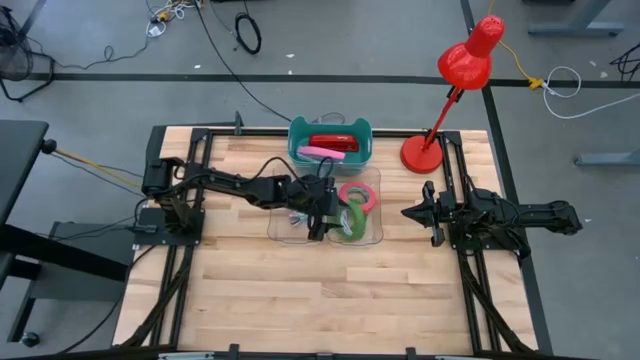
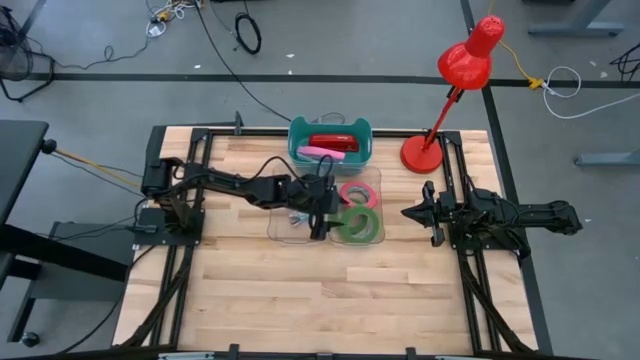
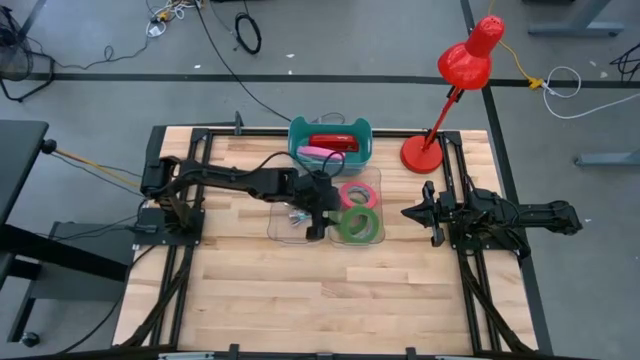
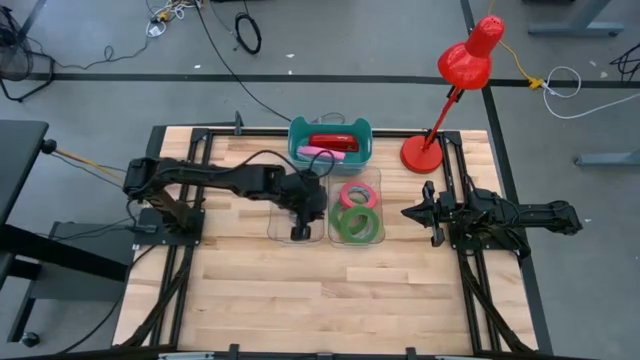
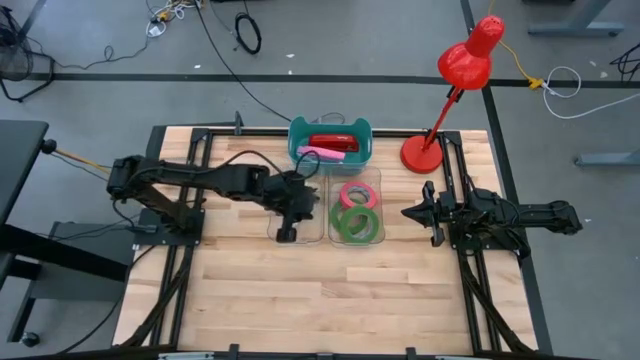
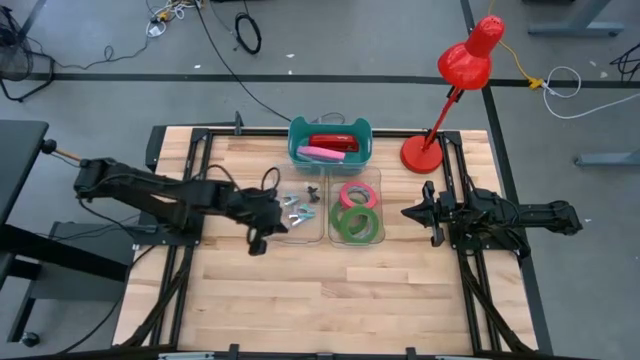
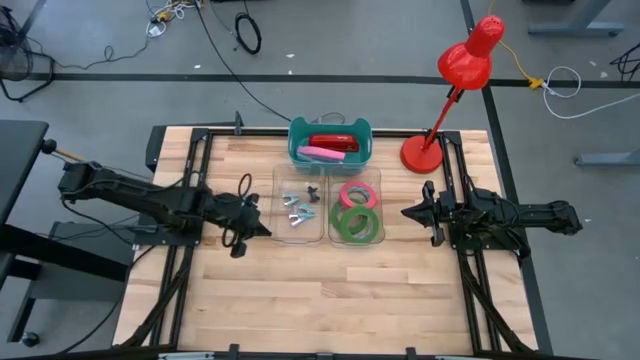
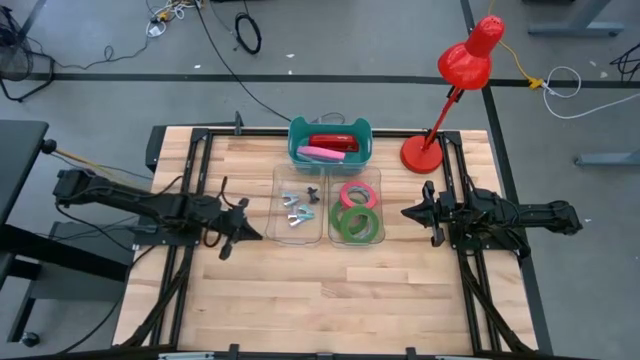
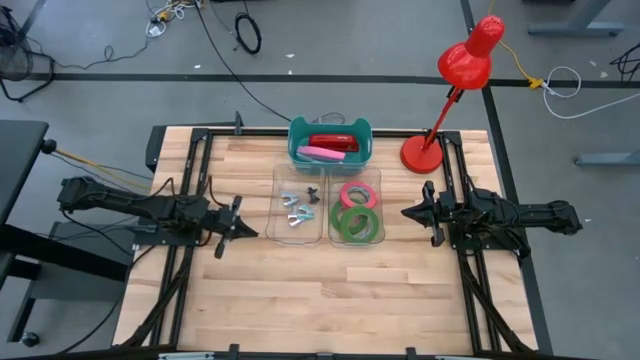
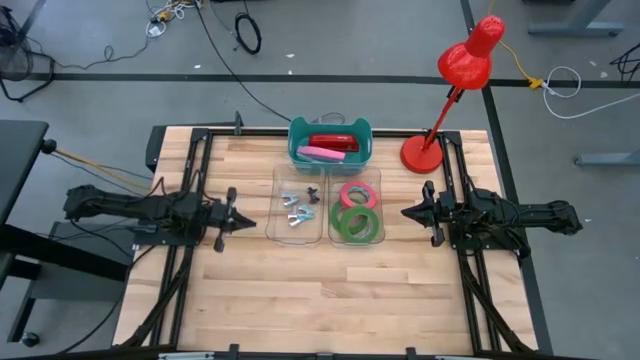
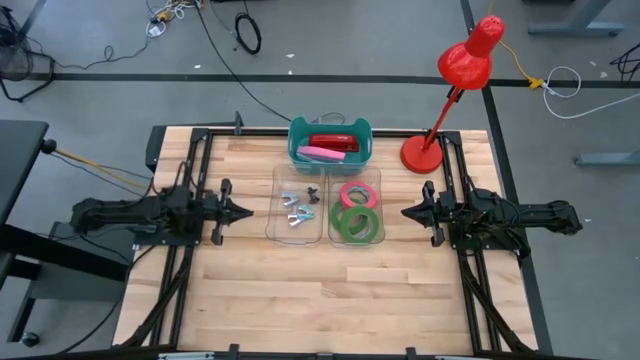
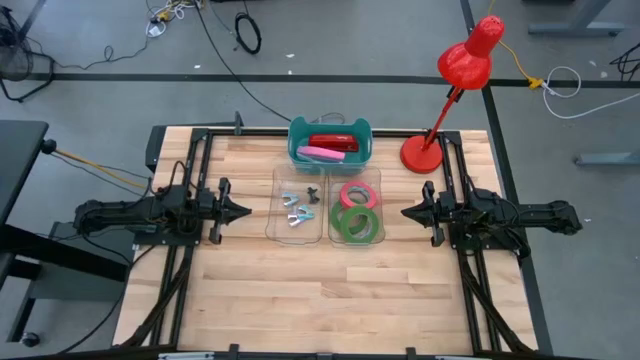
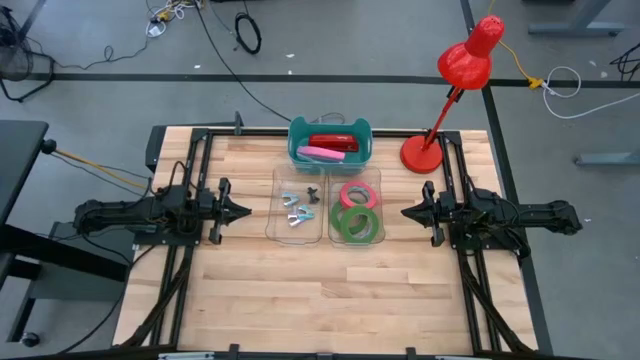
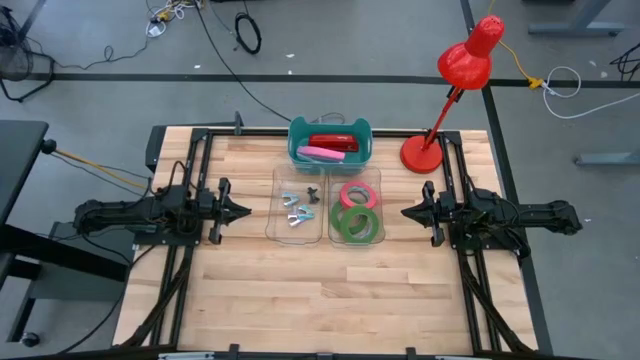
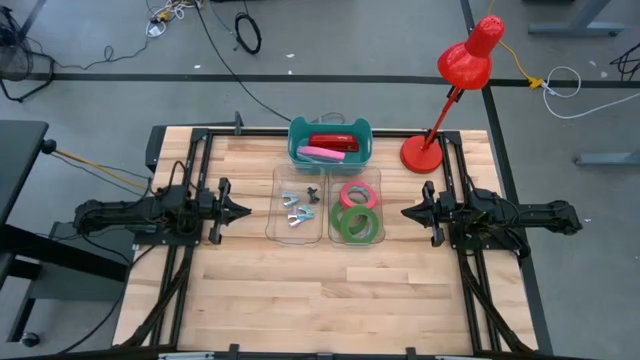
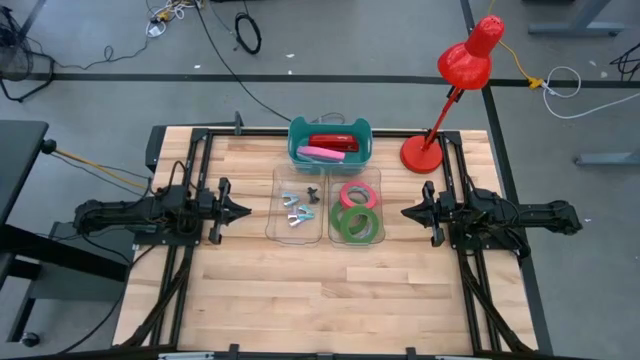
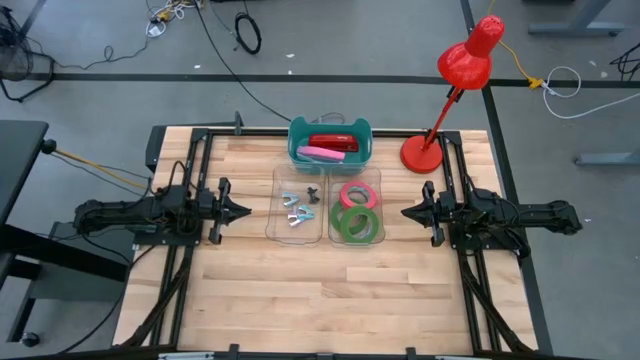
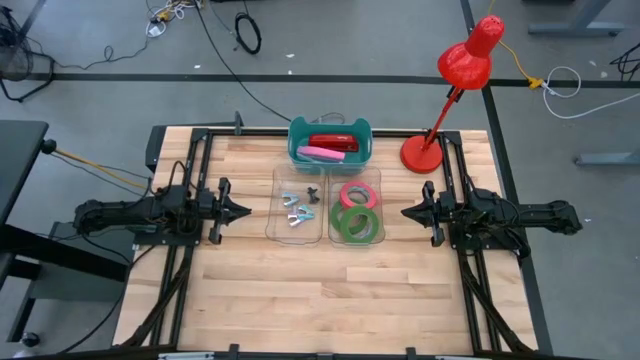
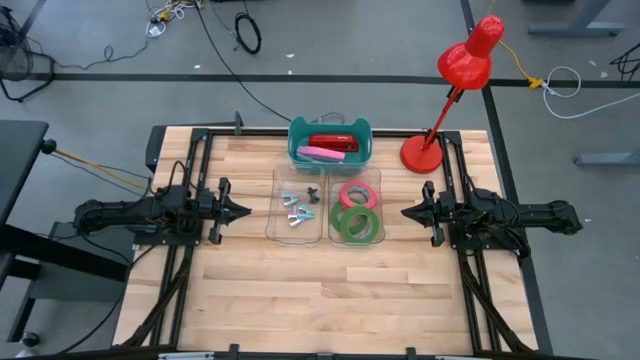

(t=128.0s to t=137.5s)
Task: Pick and place Stapler, Stapler remover, tape
Return to Home Position

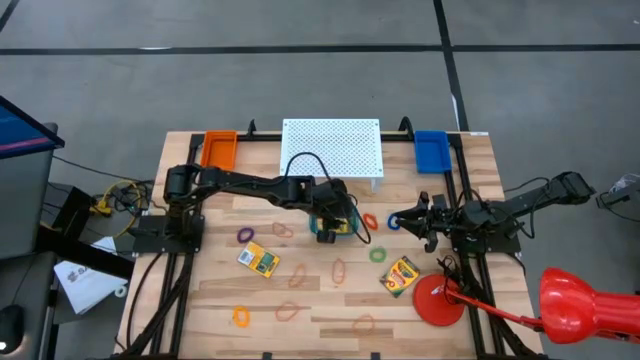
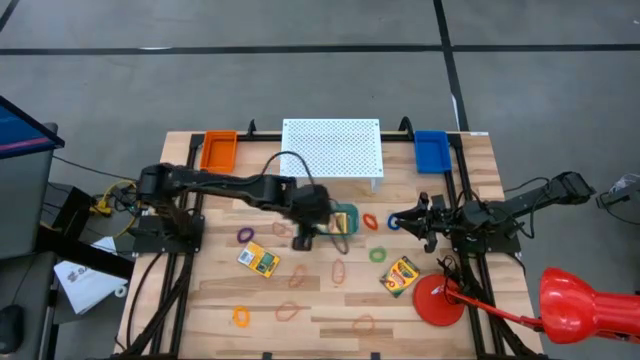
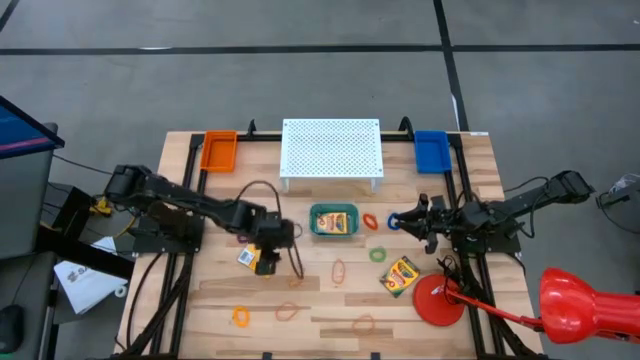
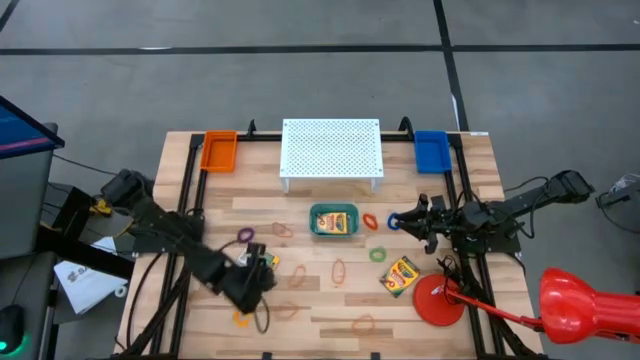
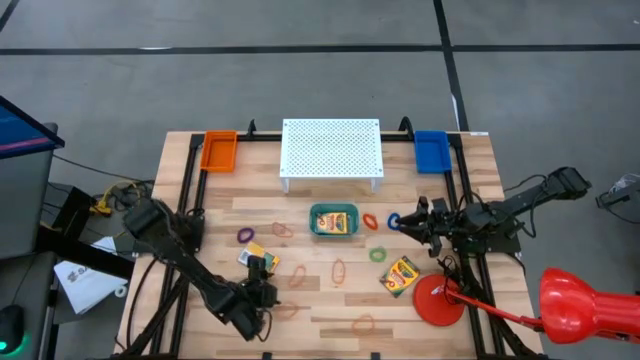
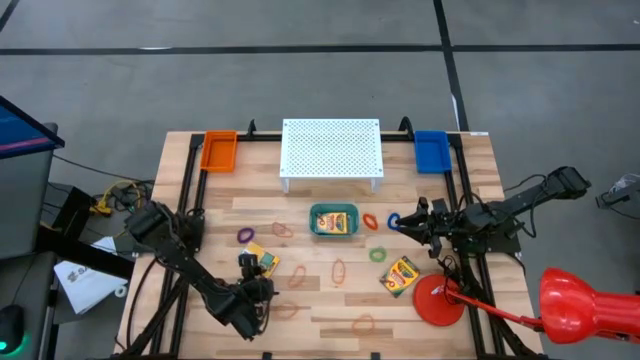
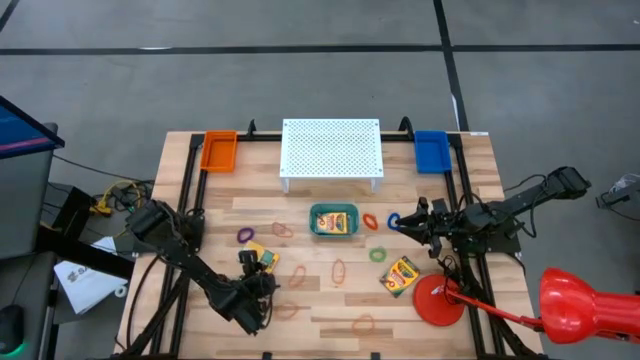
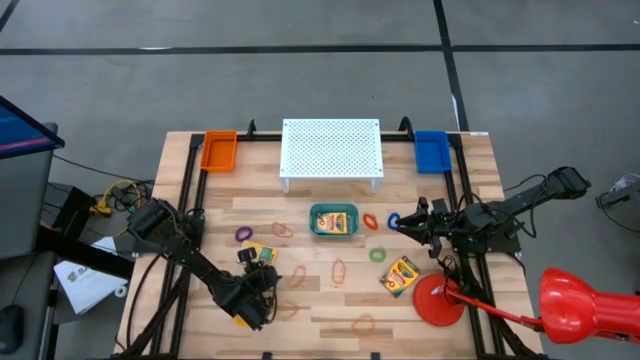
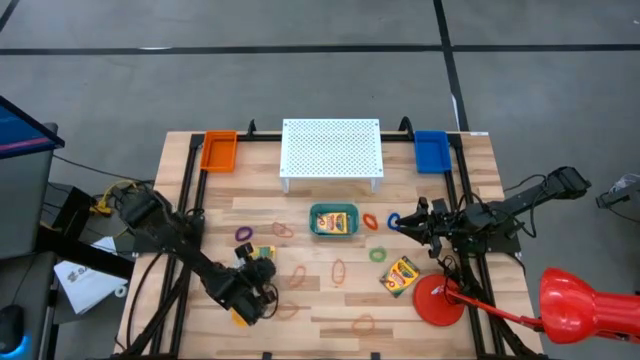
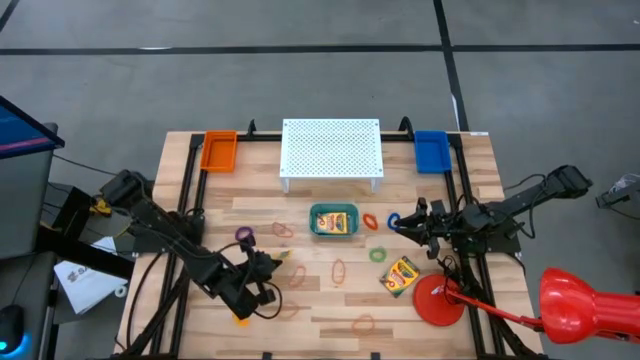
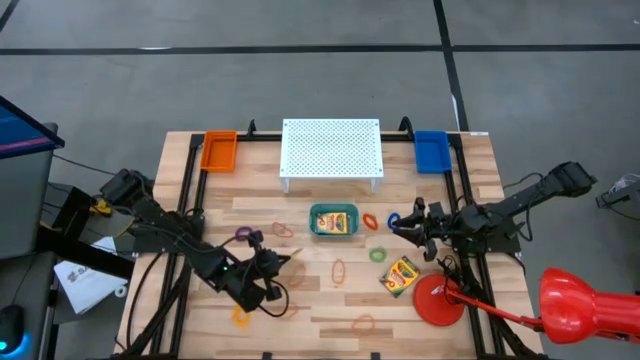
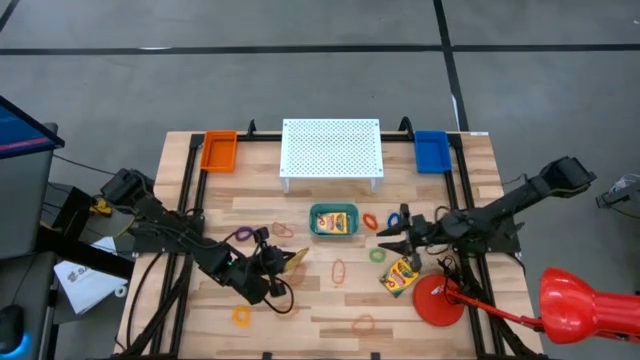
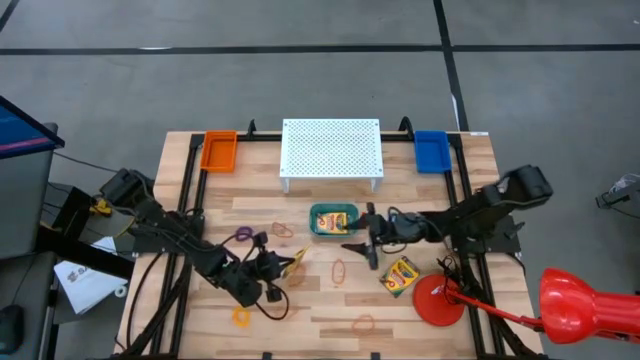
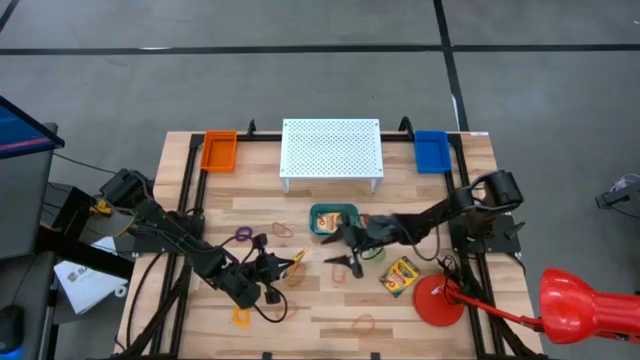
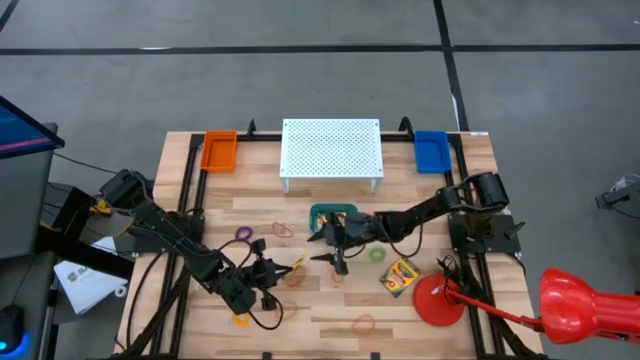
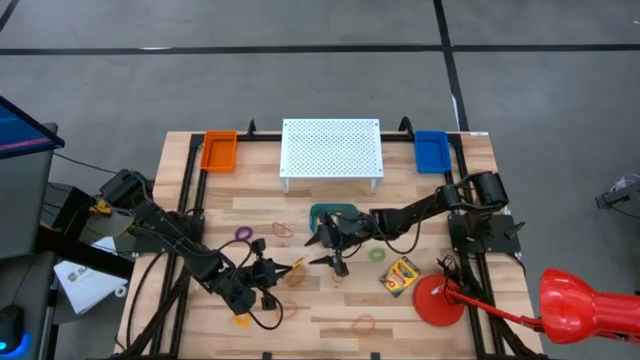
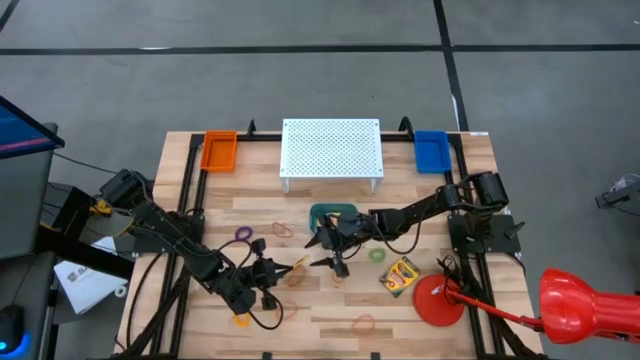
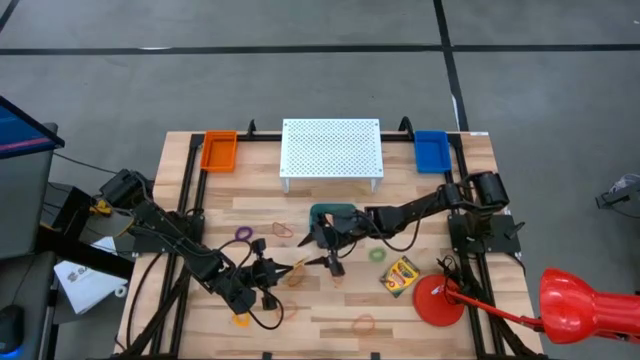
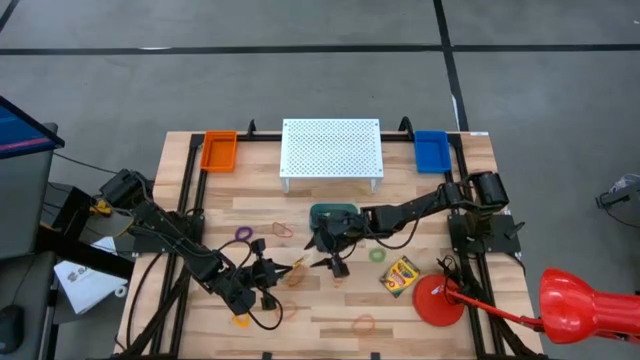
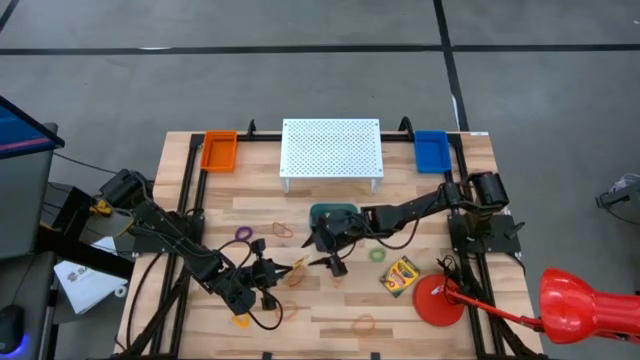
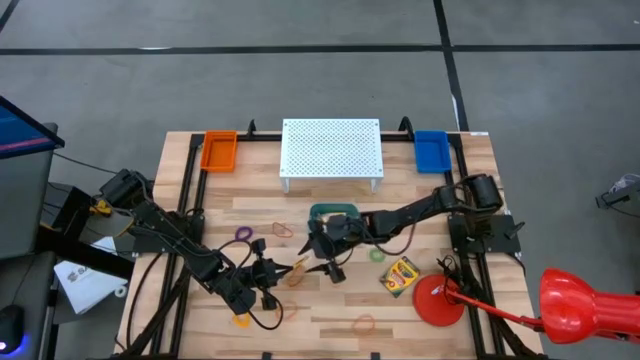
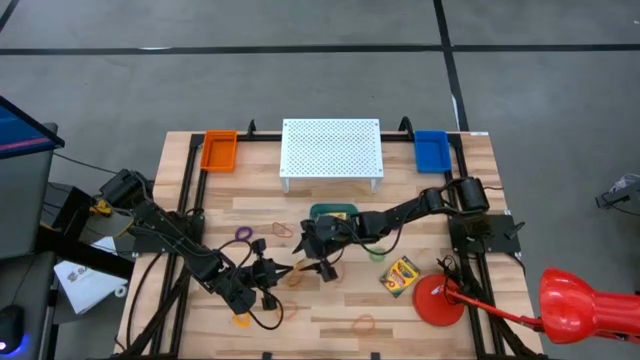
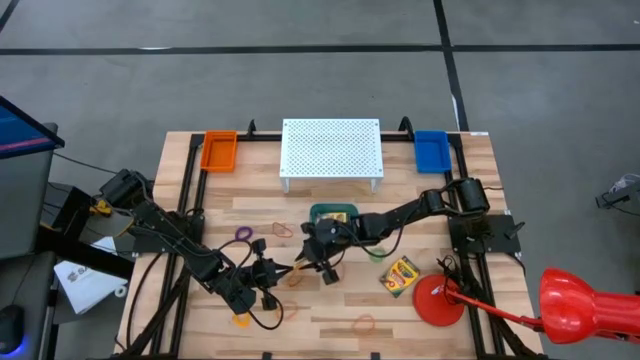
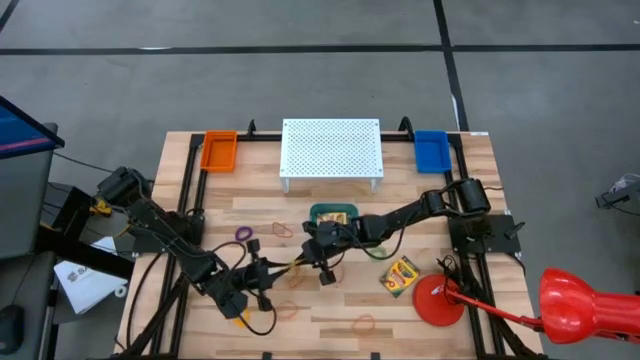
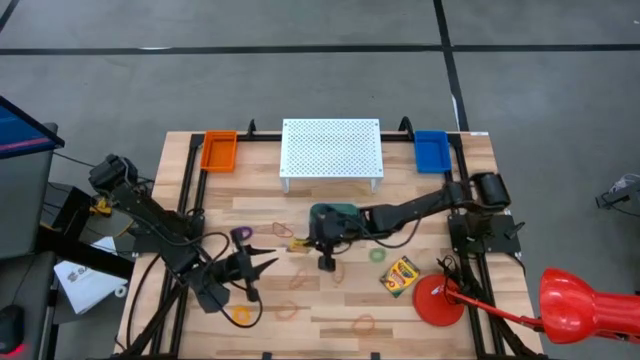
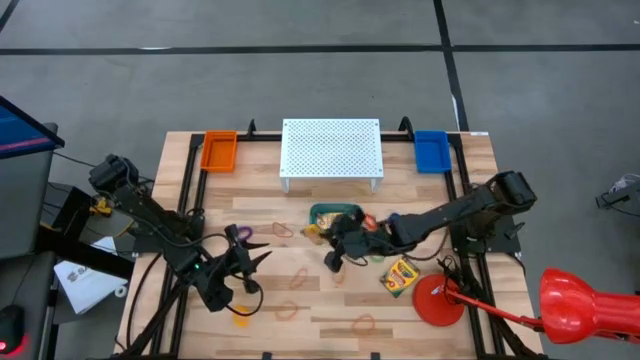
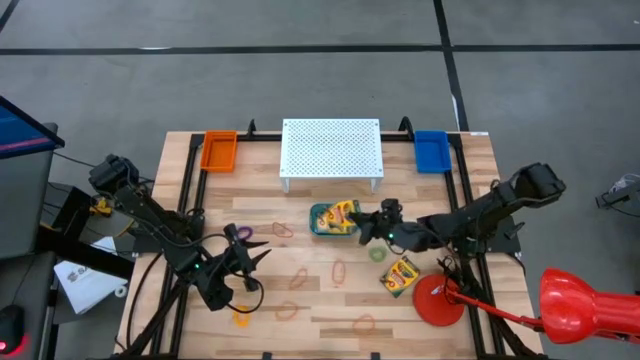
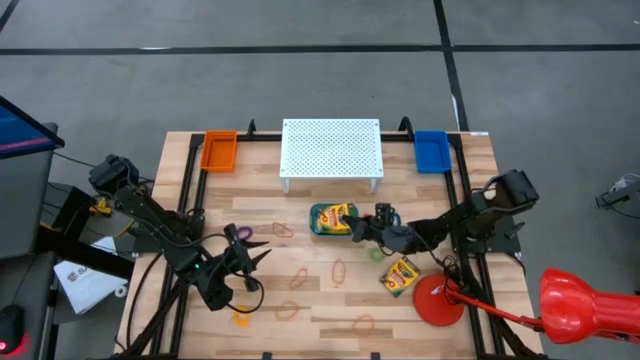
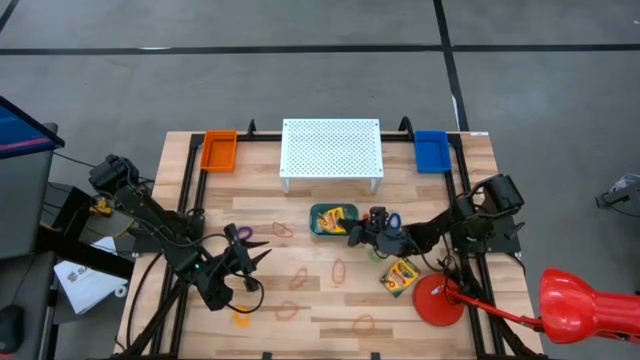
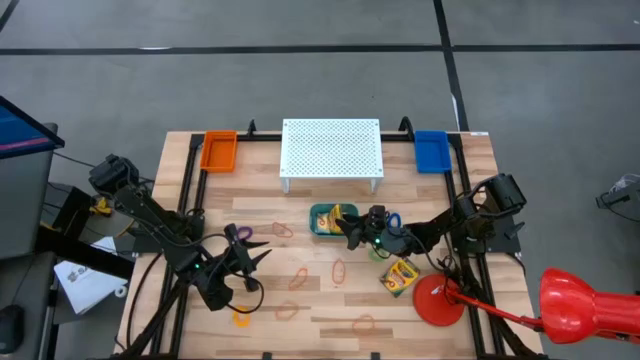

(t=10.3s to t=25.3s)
Task: Pick & Place Office Desk Supplies
Put the yellow crayon box into the green bin
